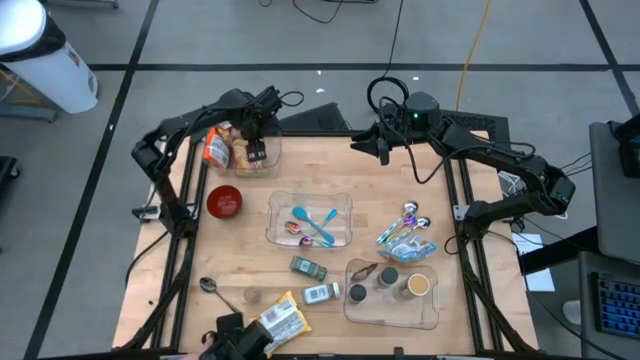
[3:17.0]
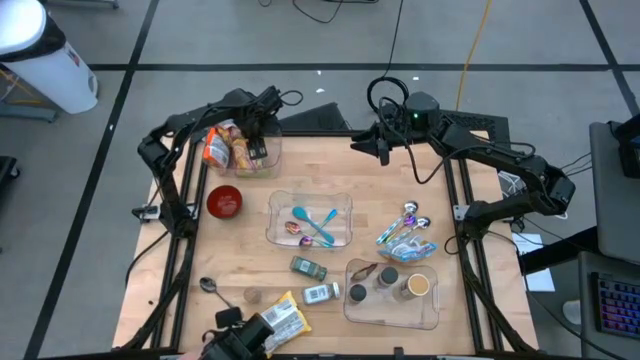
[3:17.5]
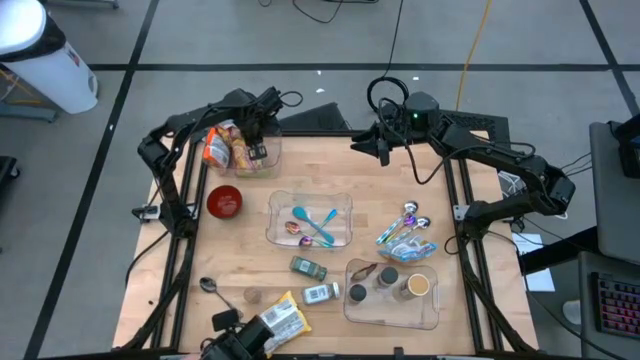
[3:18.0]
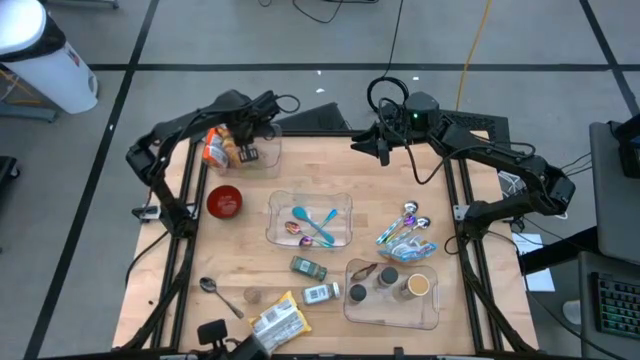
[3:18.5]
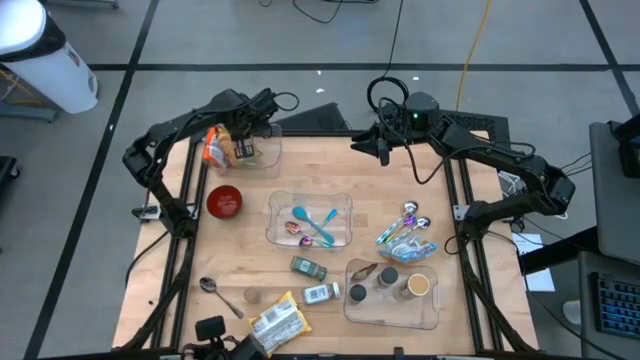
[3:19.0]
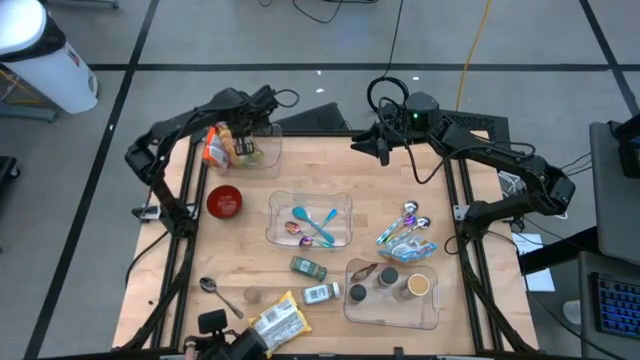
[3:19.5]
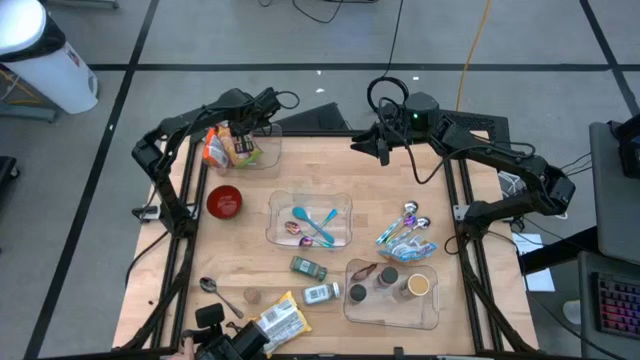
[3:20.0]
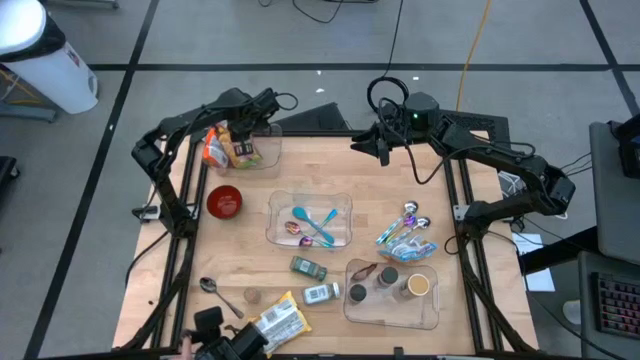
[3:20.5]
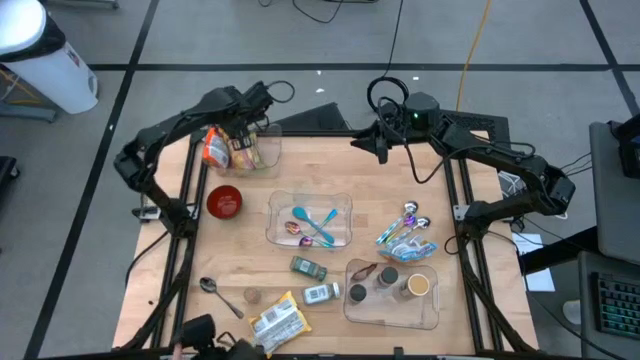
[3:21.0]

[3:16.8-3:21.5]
Task: Pick & Place Food Item
Adjust the green noodle pack in the top transparent bin

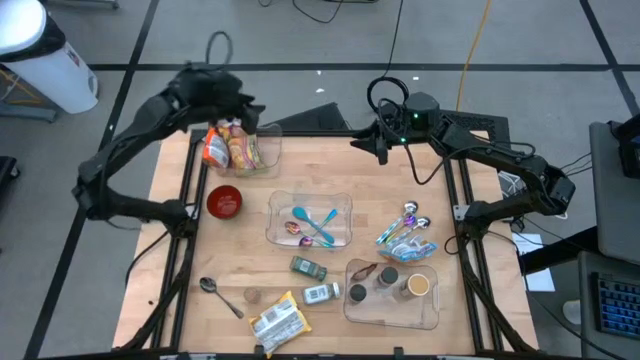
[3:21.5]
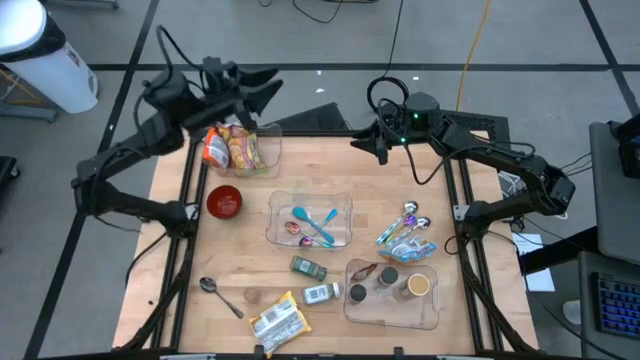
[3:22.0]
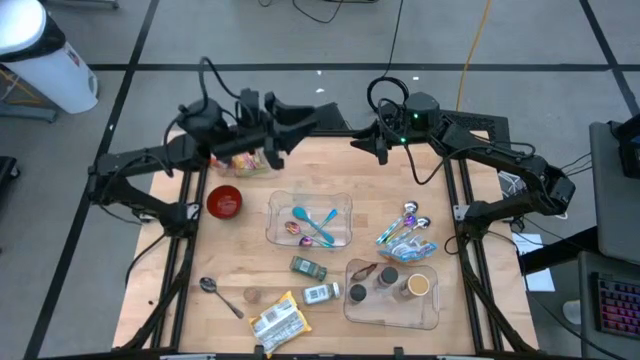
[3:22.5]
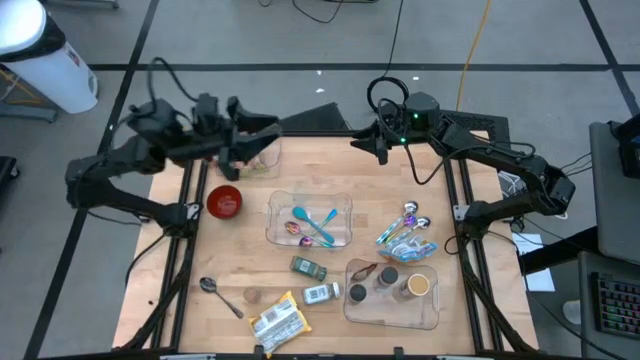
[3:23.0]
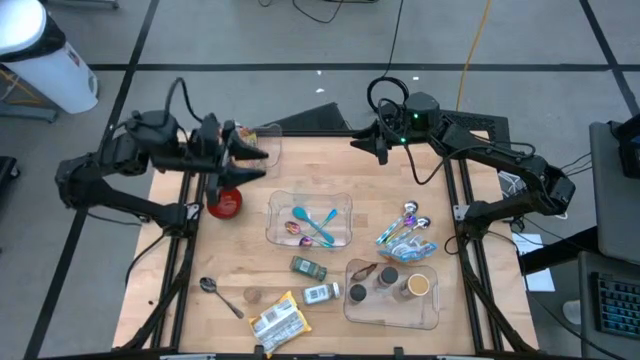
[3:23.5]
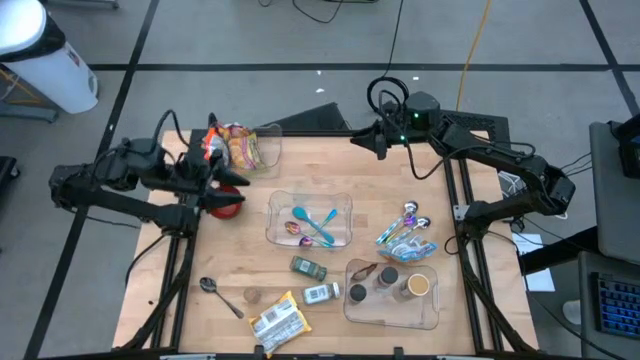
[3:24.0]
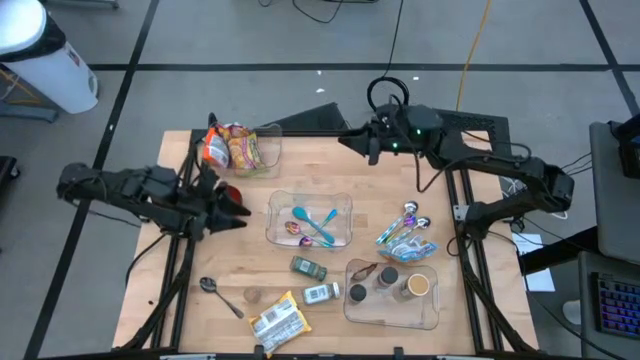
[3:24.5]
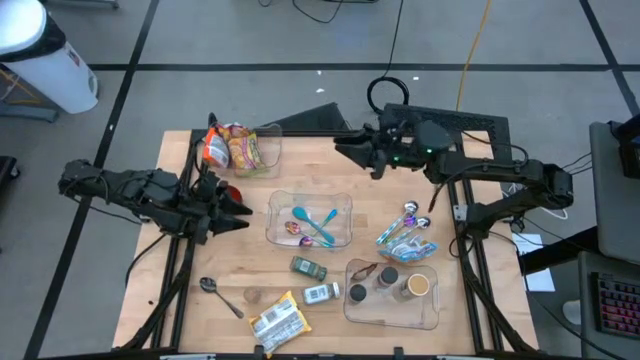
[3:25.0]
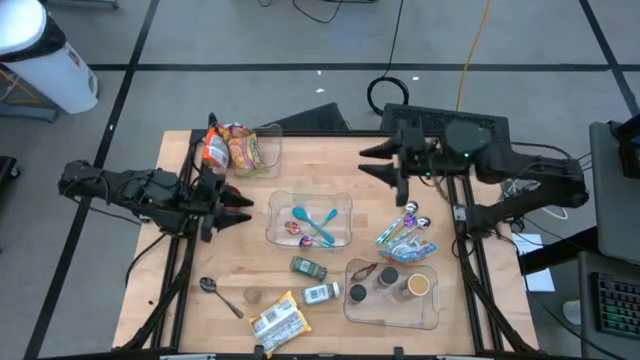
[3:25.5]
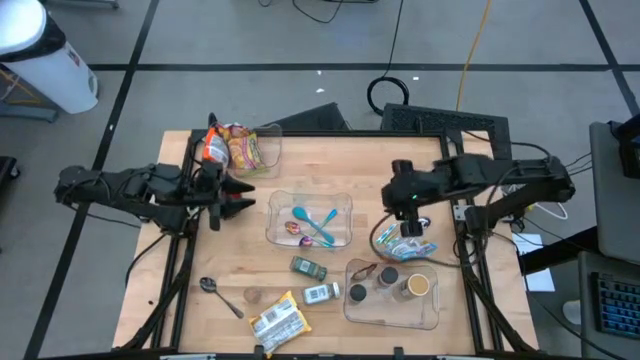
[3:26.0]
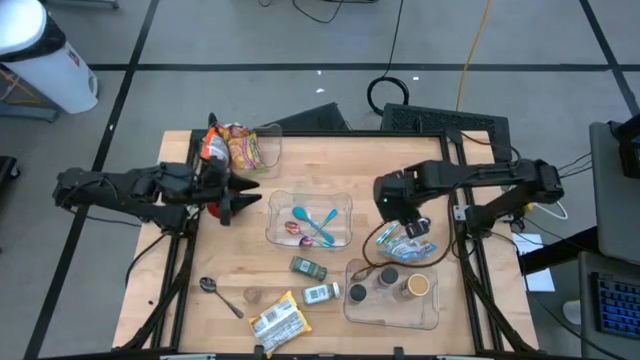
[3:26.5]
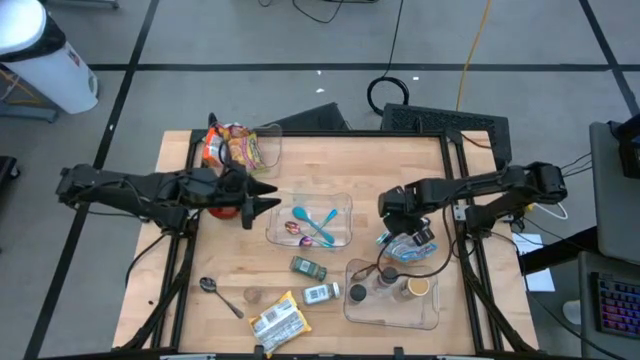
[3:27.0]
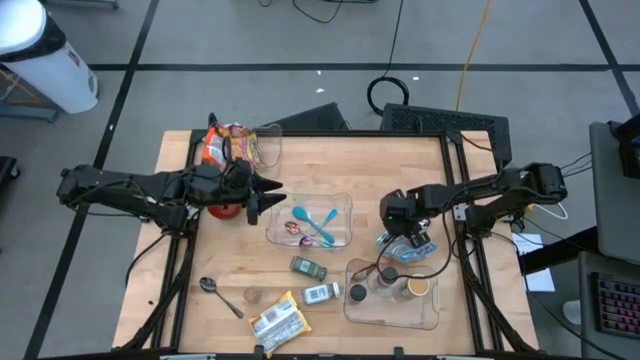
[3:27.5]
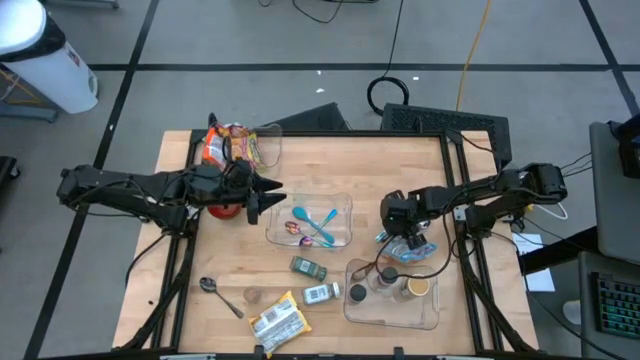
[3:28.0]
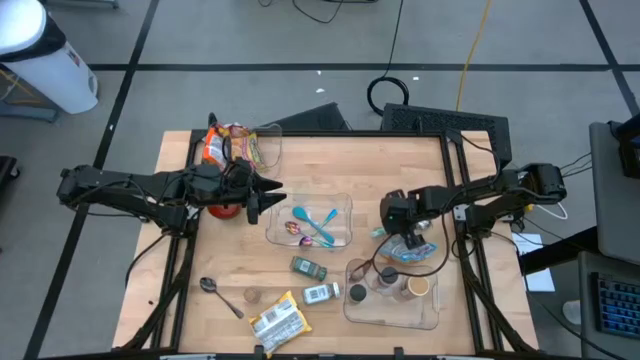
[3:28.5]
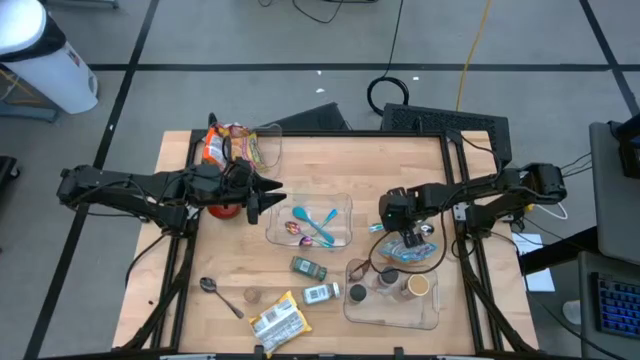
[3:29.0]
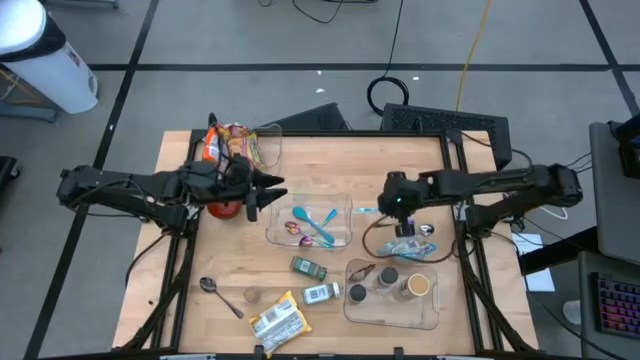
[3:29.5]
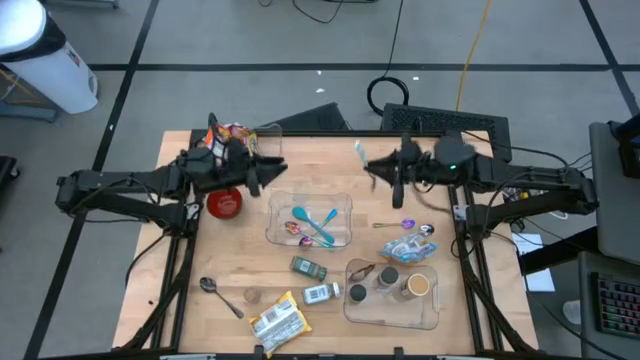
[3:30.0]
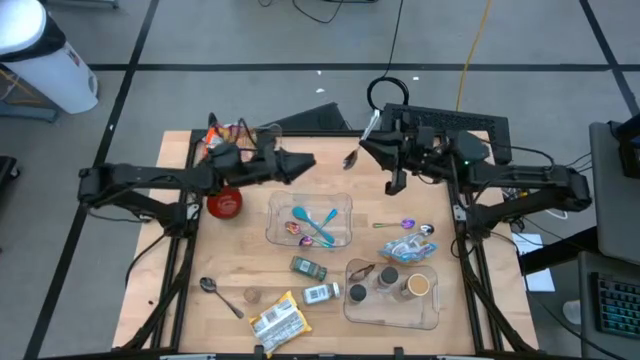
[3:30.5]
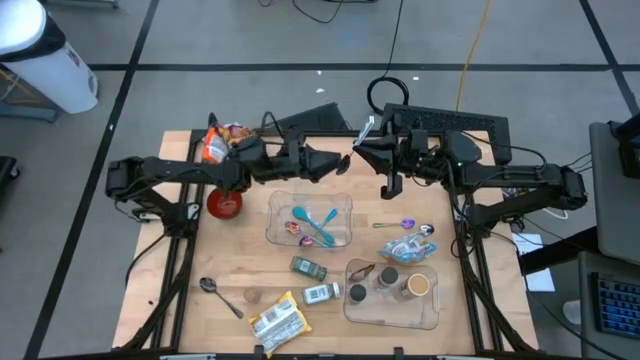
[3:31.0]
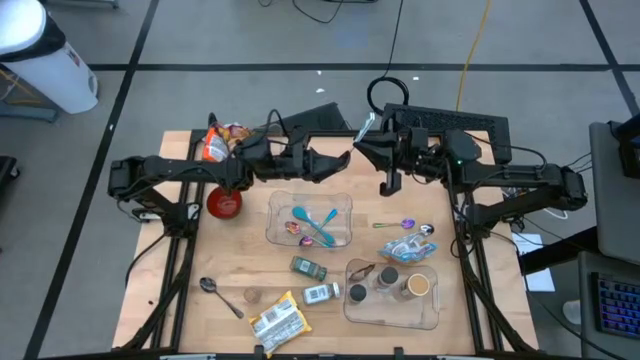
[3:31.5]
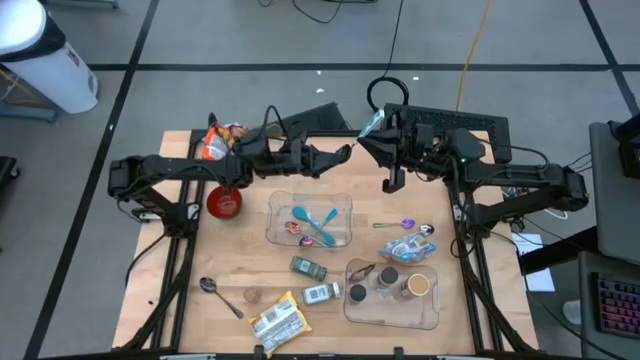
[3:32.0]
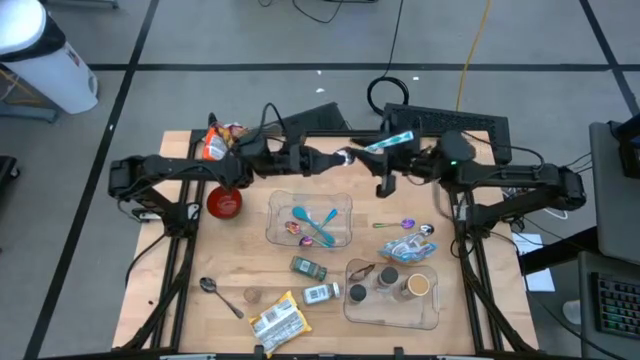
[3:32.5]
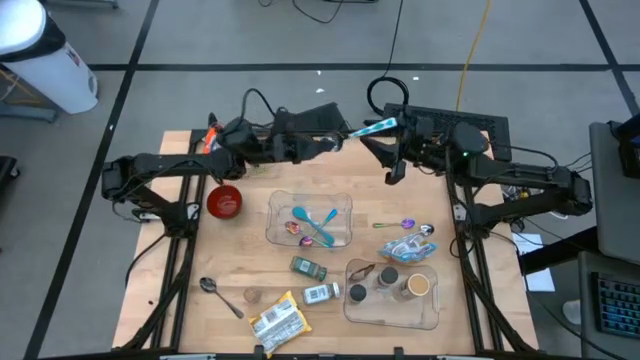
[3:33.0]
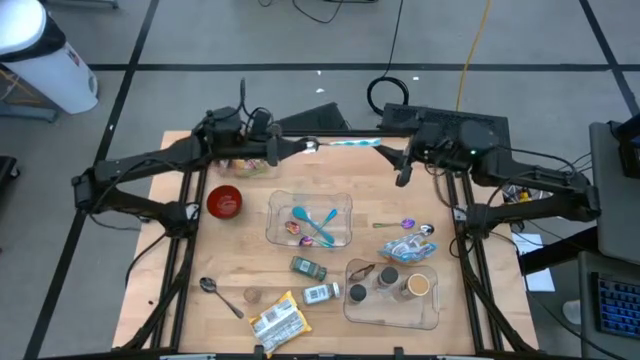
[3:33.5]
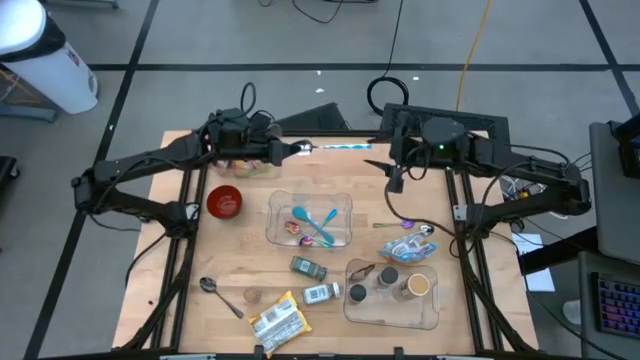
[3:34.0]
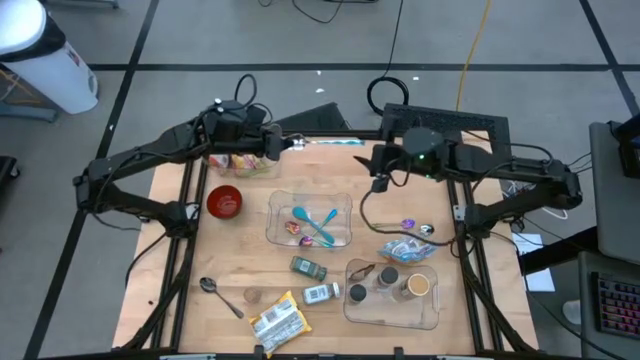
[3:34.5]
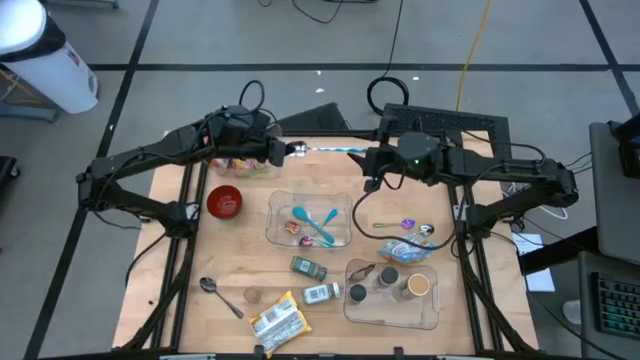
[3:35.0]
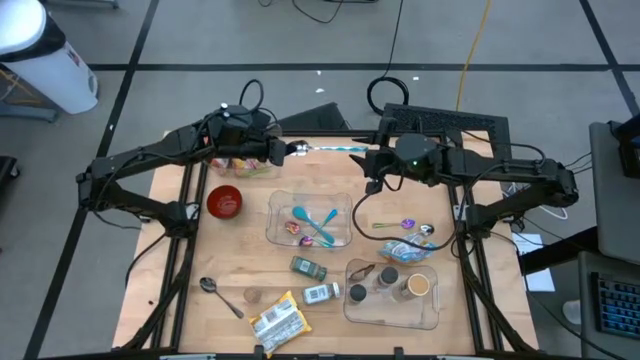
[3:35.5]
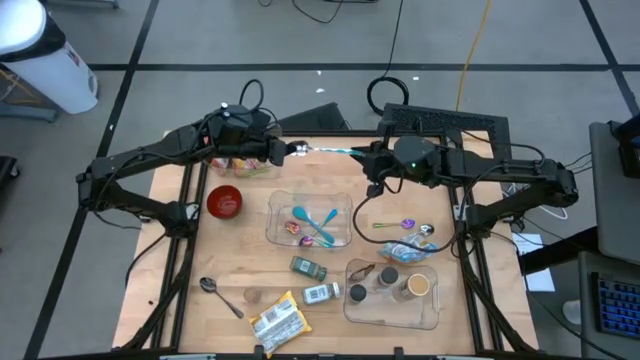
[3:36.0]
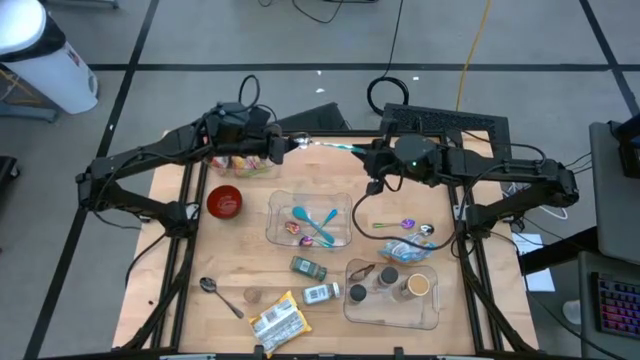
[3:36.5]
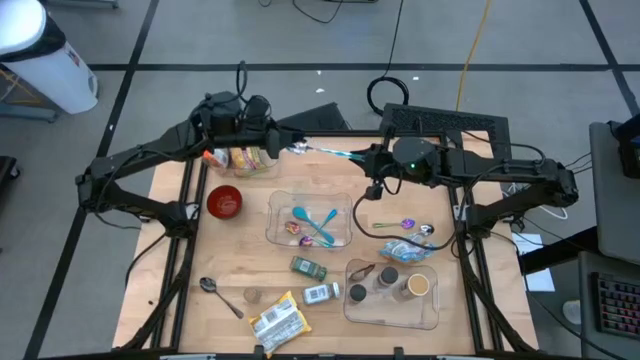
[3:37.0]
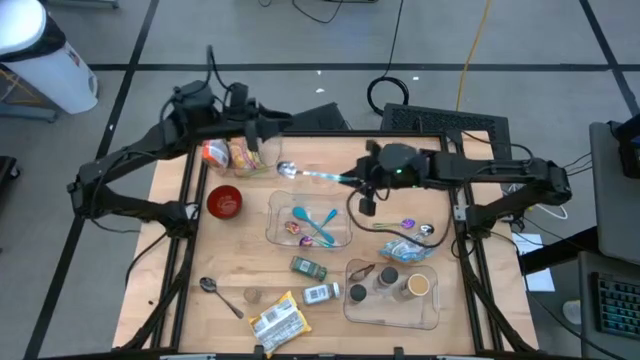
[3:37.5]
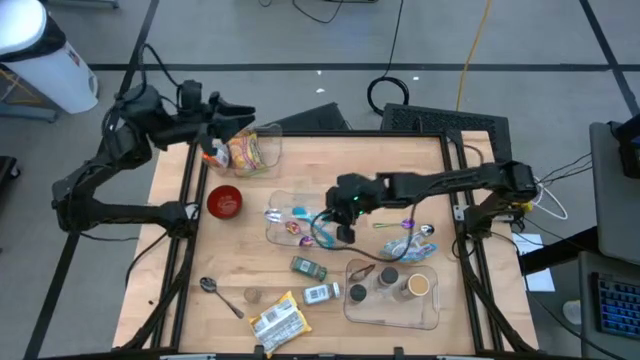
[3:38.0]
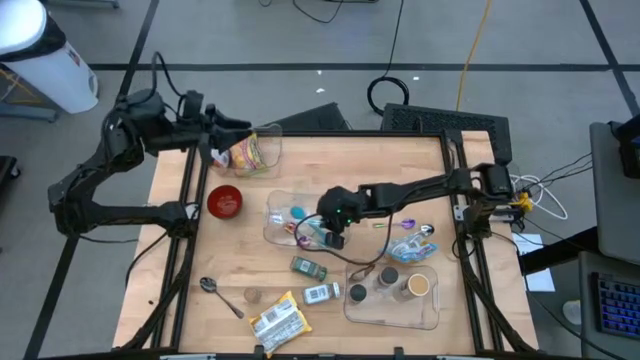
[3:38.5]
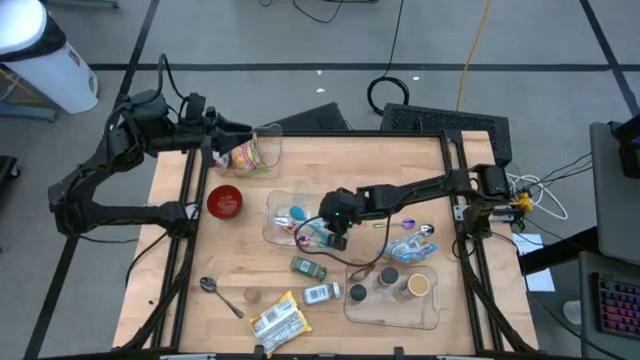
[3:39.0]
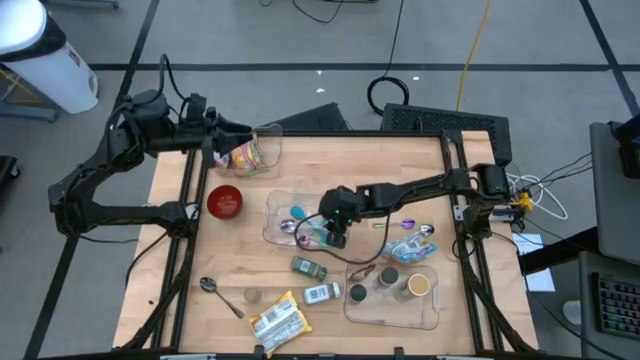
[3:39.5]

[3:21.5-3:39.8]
Put the top blue and white patterned spoon into the middle transparent bin
